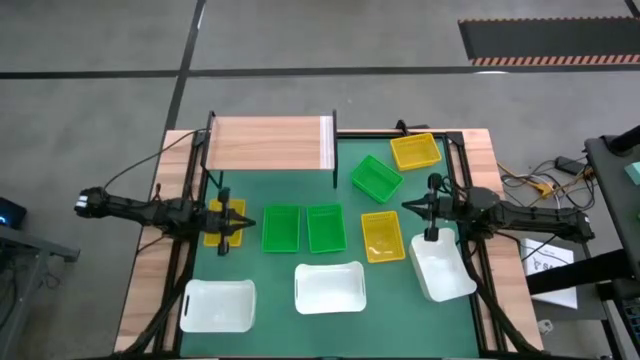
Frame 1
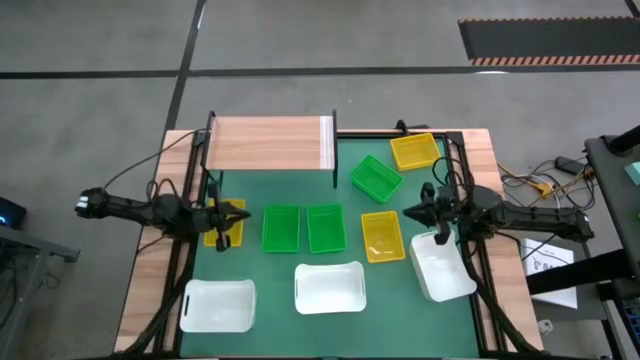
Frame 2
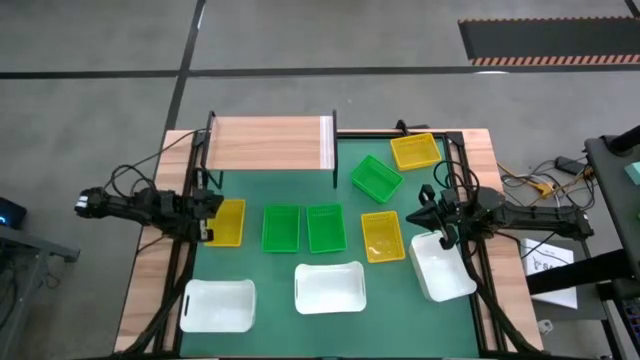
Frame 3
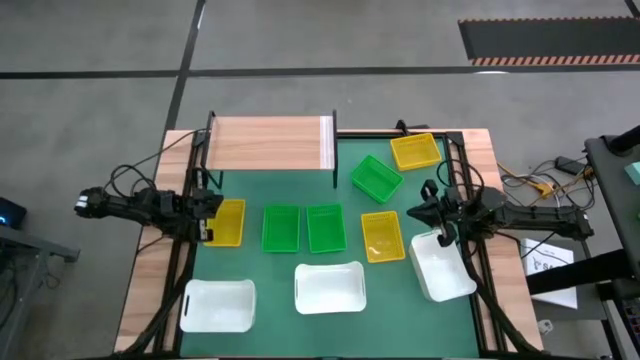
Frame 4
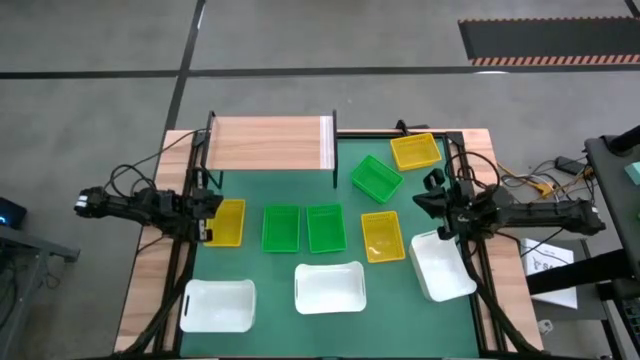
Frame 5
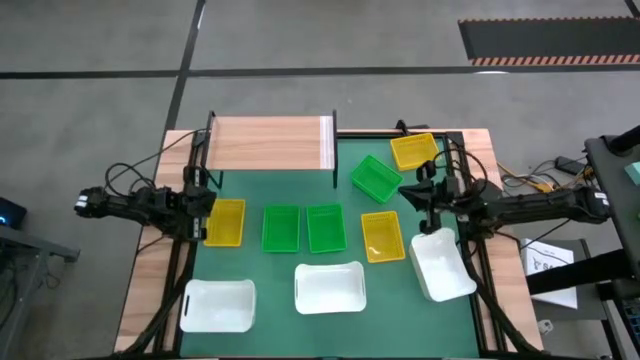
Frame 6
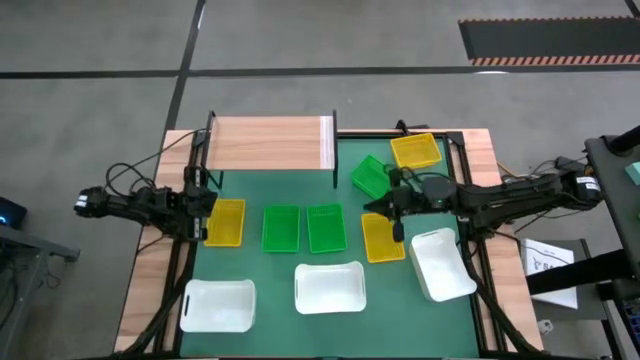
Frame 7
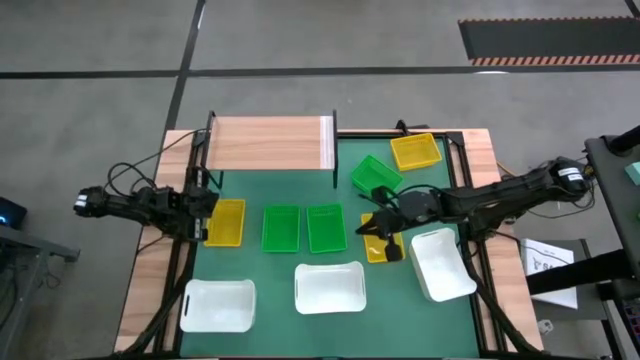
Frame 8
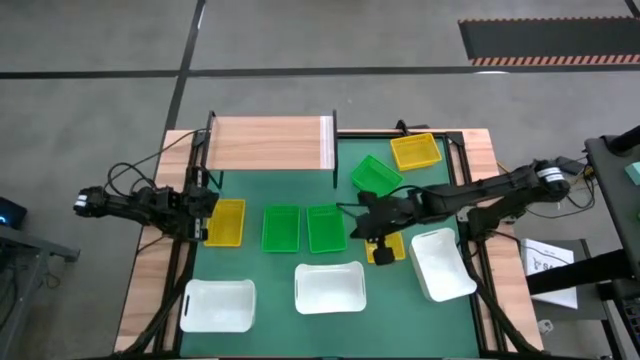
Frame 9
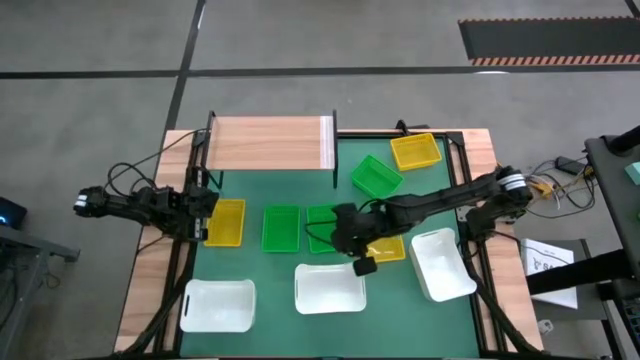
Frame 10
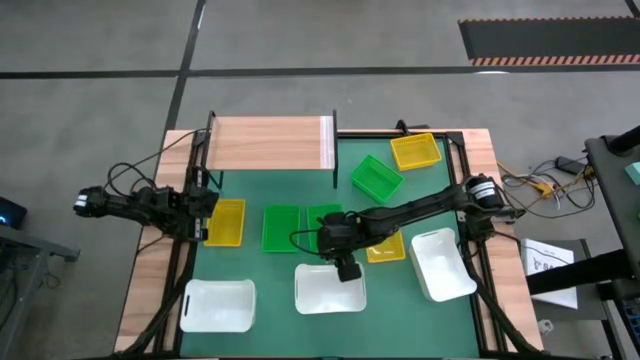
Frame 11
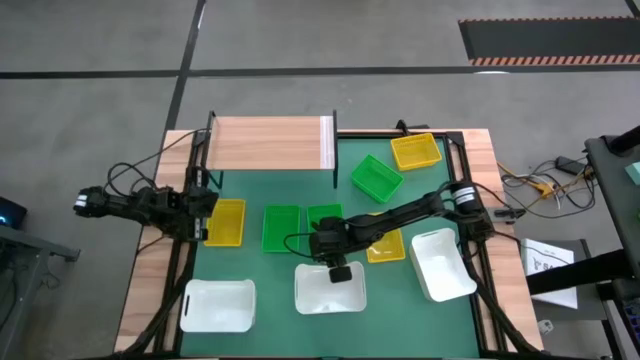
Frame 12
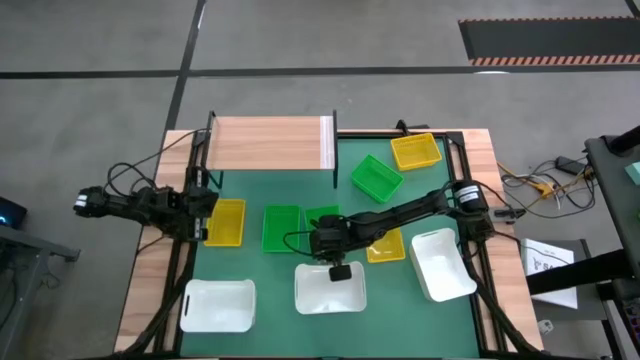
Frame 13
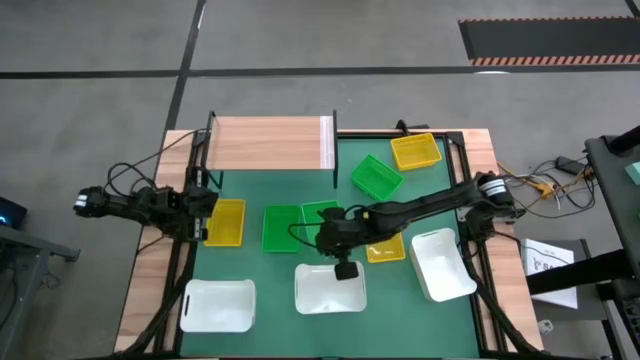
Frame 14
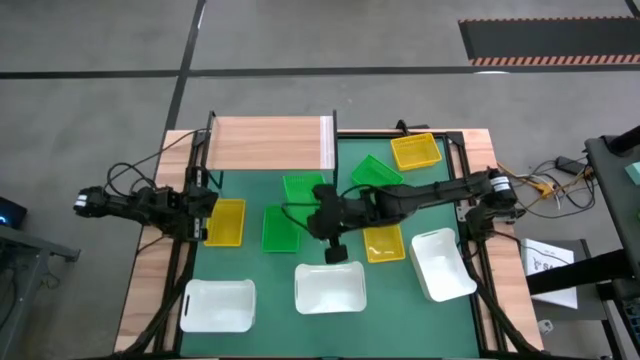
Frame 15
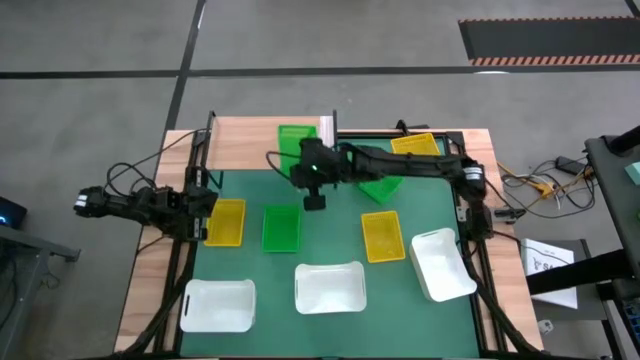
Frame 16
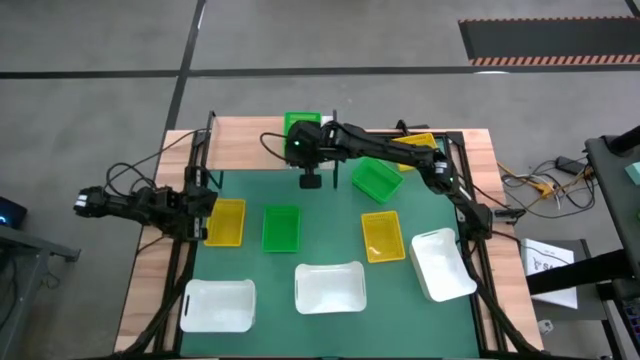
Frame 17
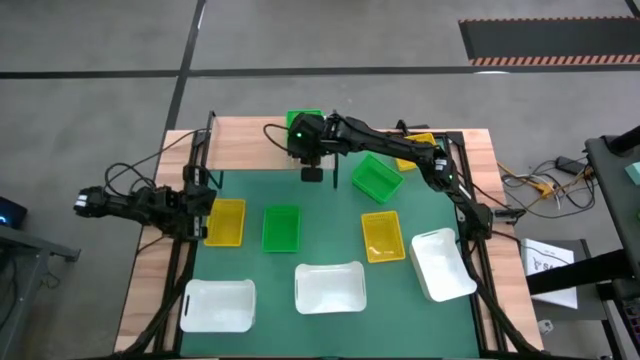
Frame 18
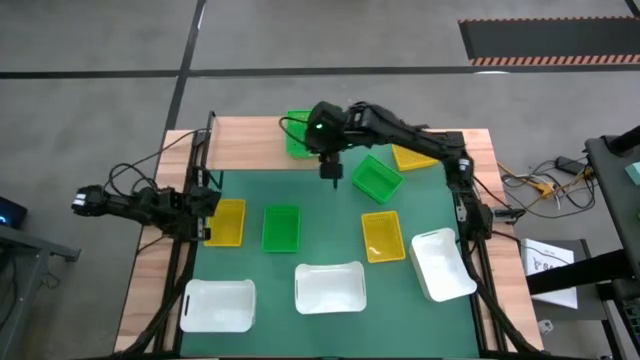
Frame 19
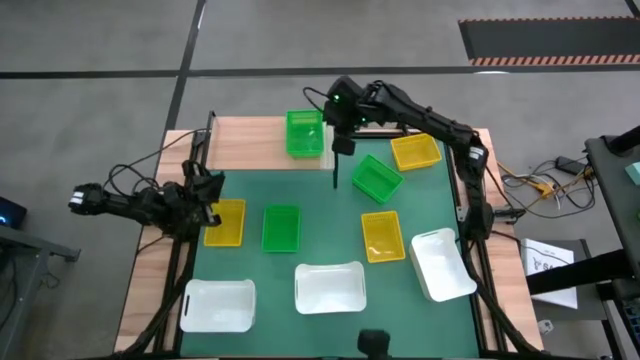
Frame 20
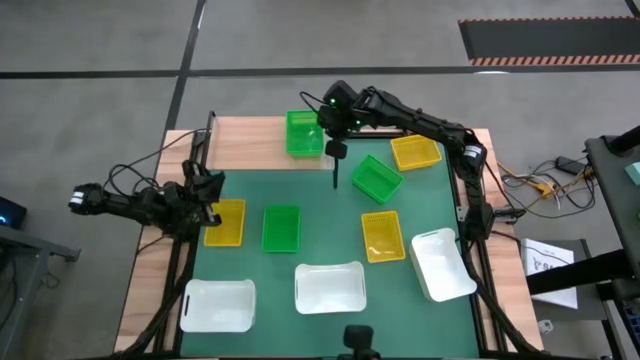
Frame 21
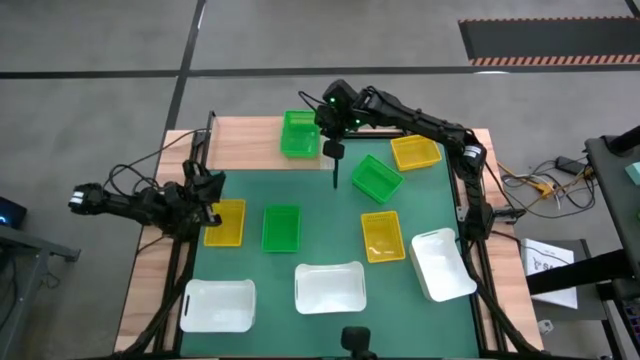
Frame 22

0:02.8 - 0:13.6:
Put the middle green basket on the shelf

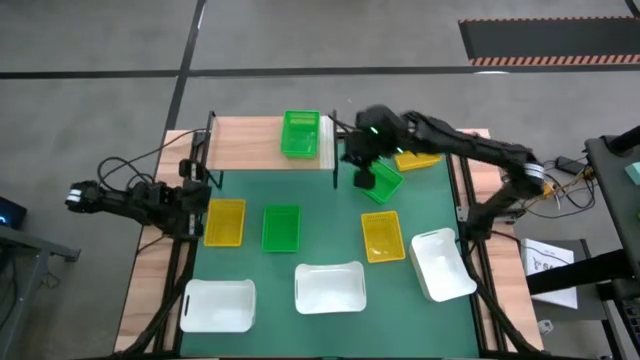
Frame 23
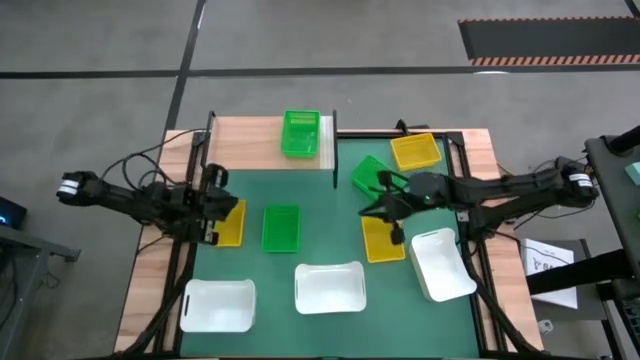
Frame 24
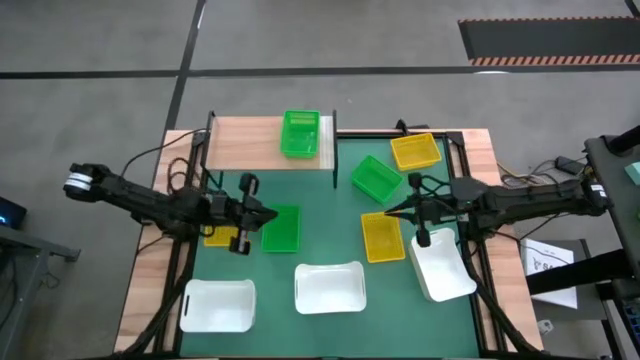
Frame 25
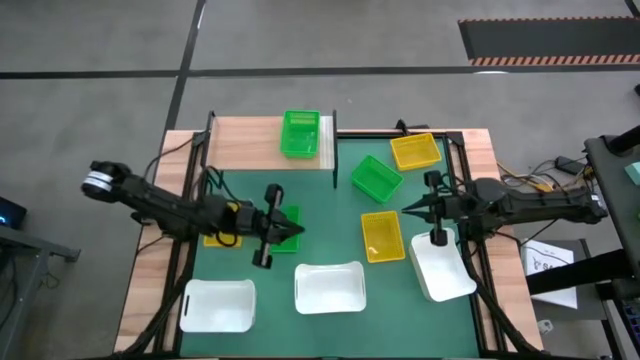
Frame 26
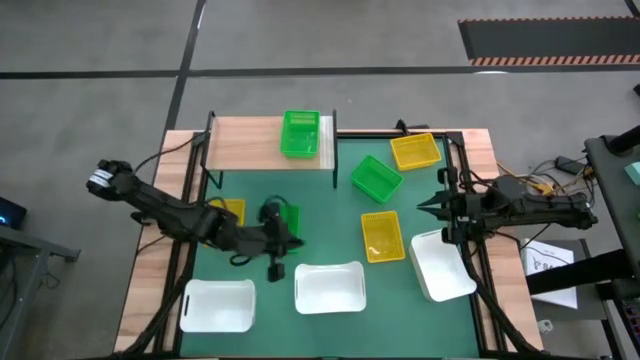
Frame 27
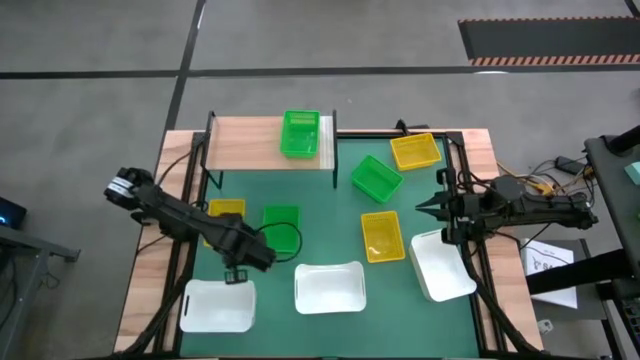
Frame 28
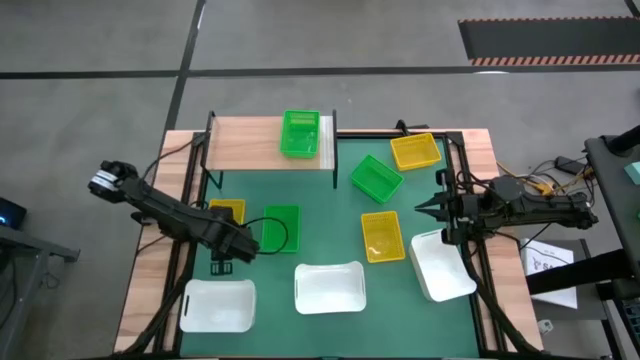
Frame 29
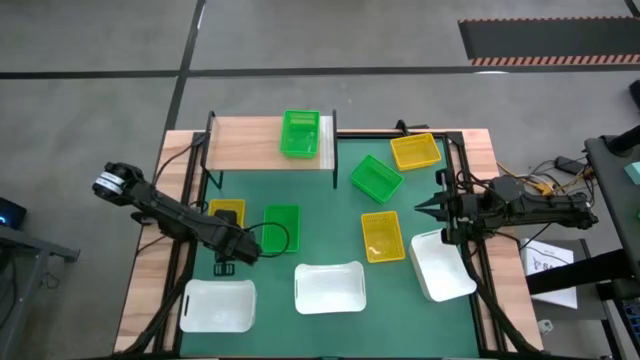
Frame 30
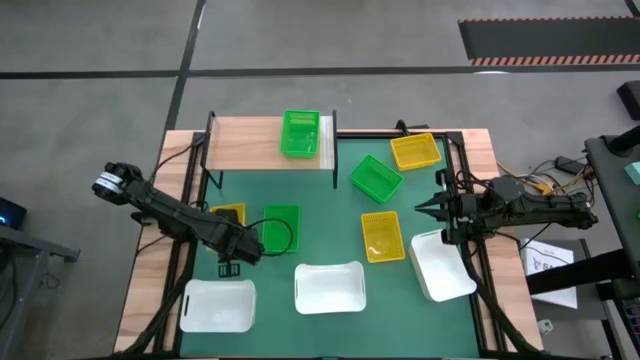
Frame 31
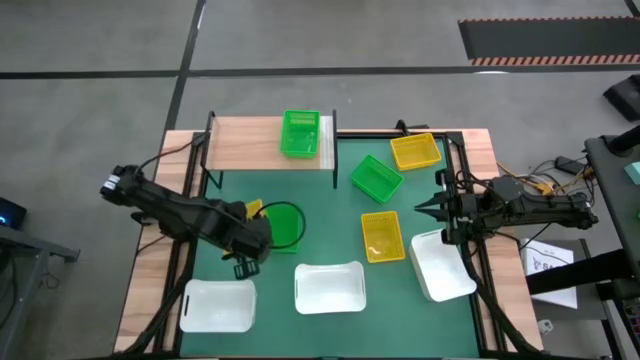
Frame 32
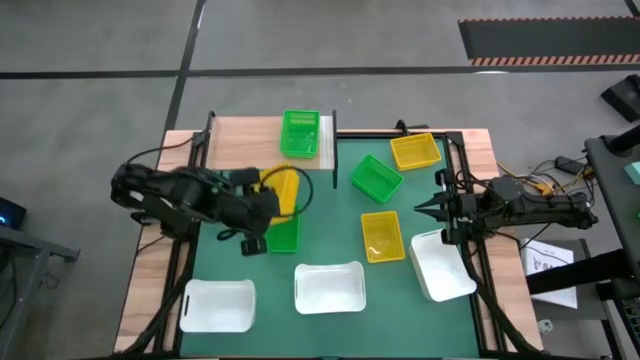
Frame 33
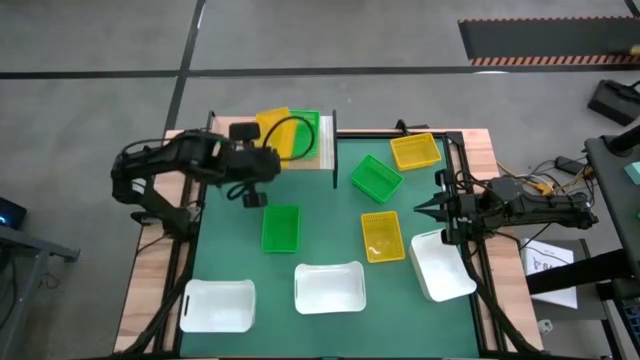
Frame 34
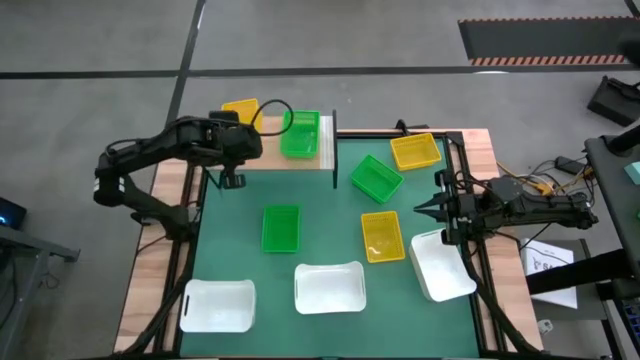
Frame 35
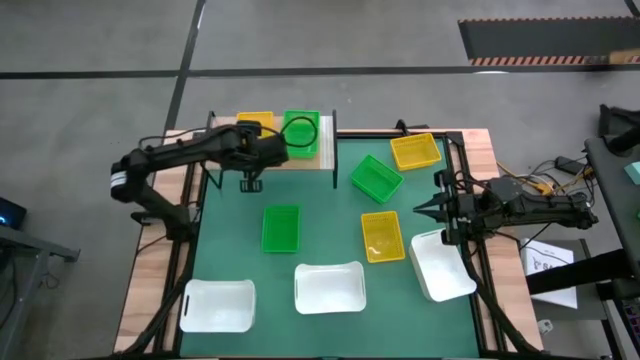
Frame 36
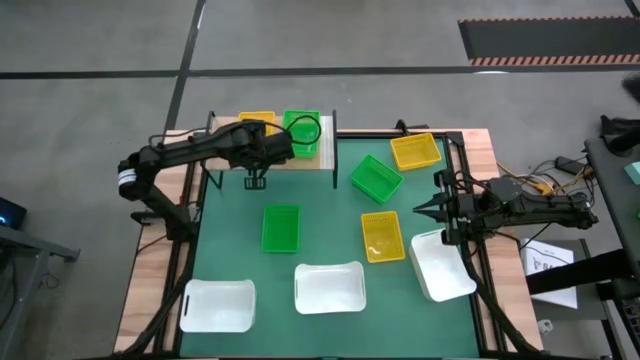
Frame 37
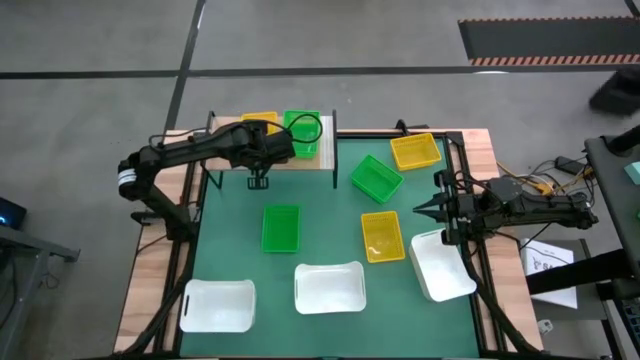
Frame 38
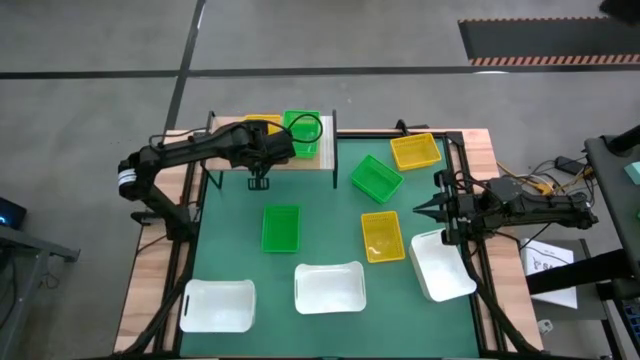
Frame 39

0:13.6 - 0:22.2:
Put the left yellow basket on the shelf

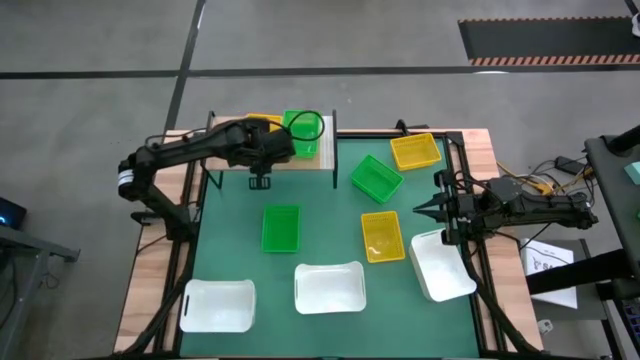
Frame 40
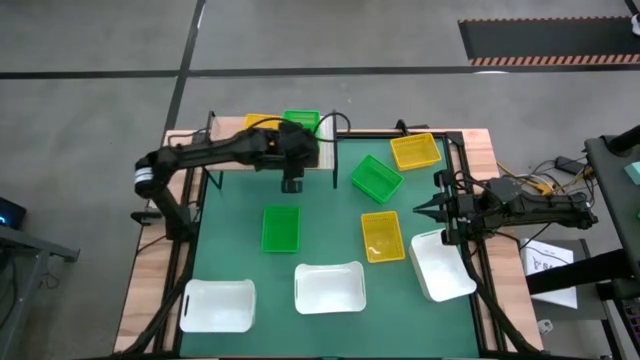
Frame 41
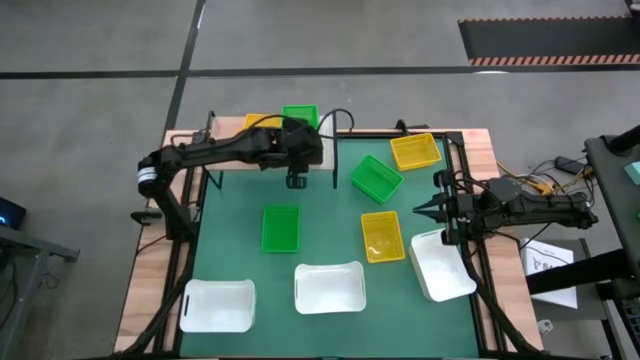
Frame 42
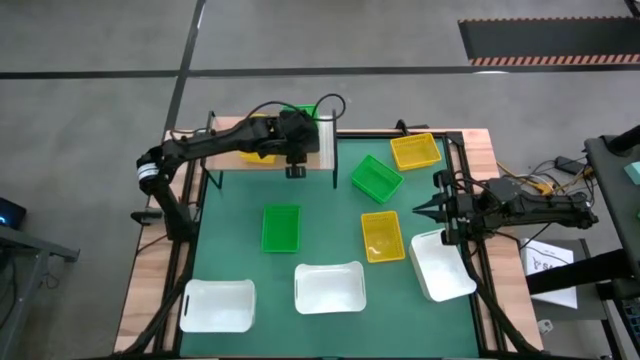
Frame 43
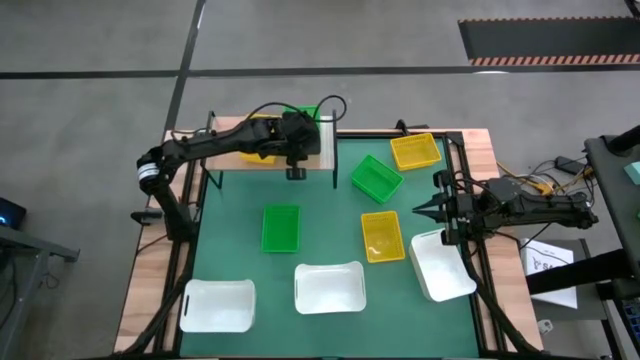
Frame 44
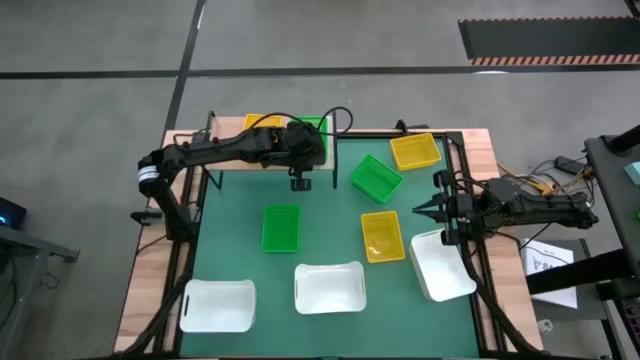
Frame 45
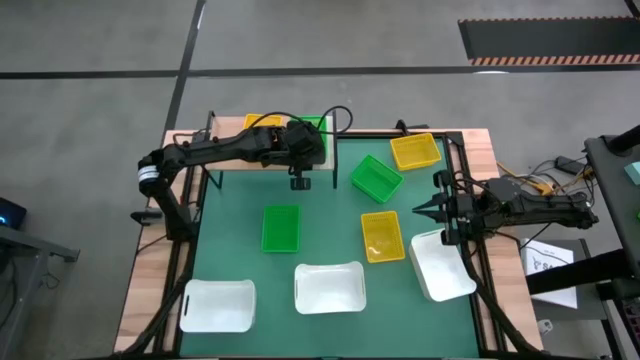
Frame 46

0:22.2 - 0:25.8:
Adjust the green basket on the shelf
